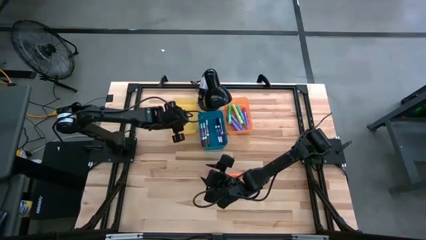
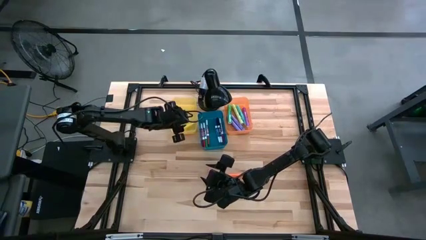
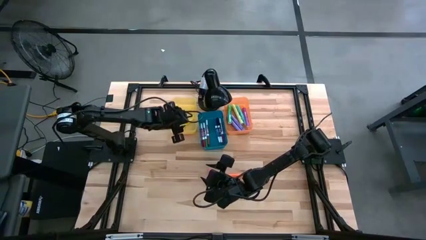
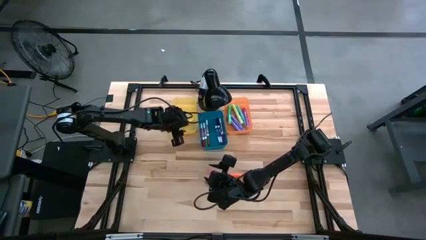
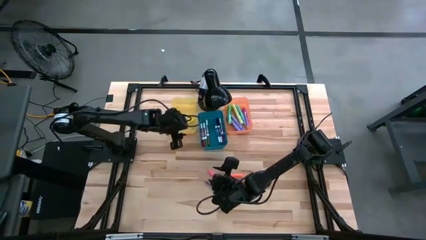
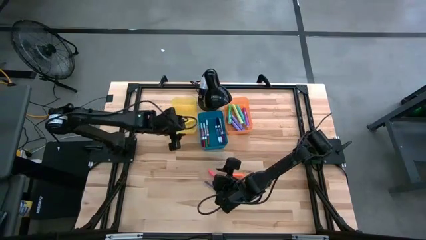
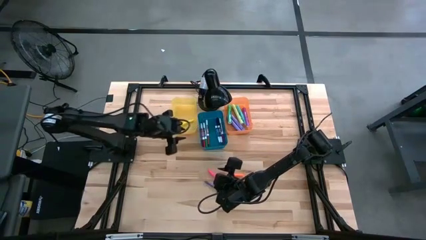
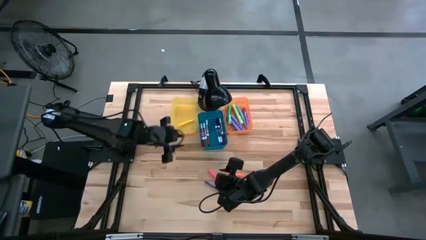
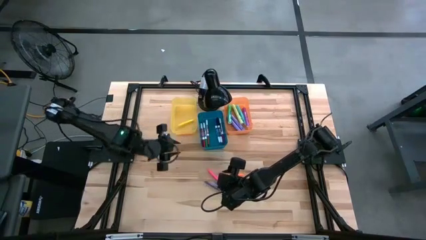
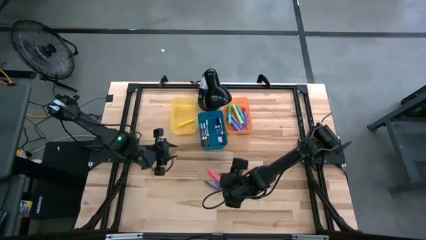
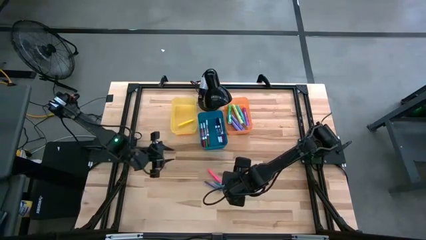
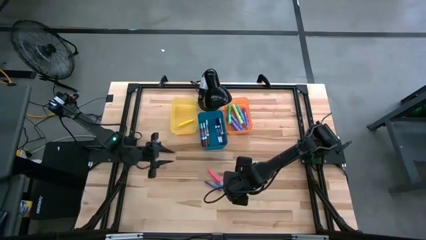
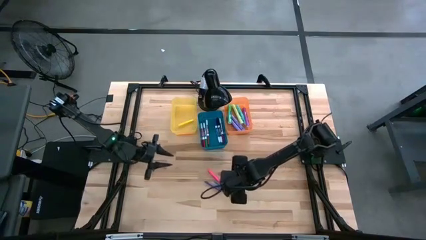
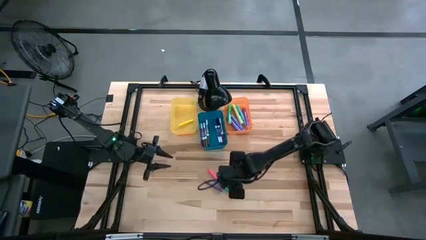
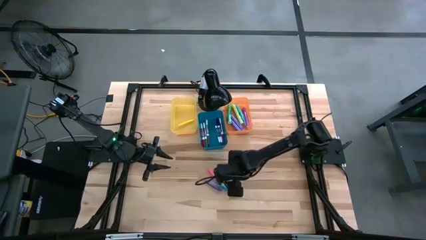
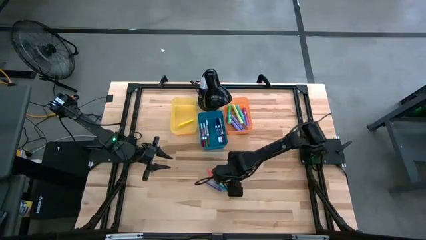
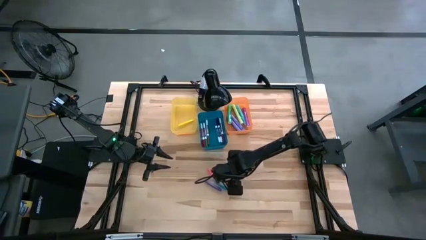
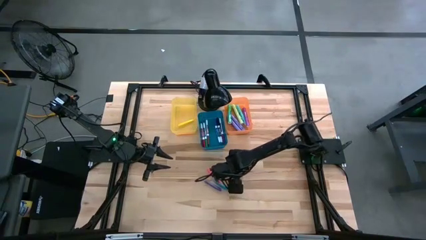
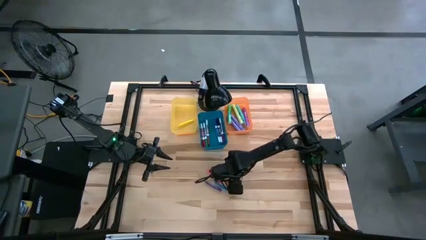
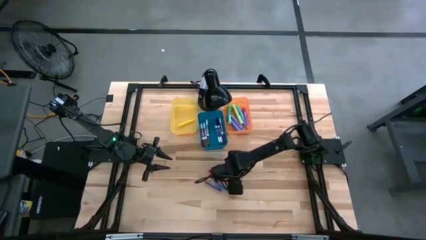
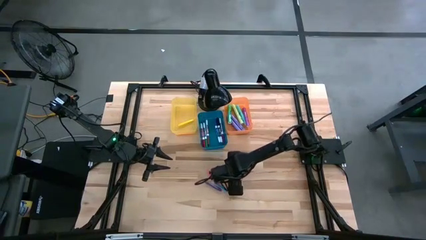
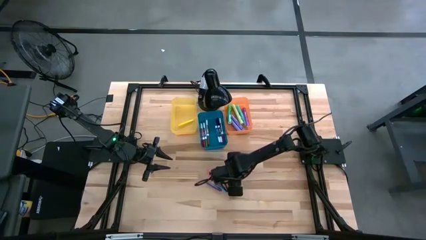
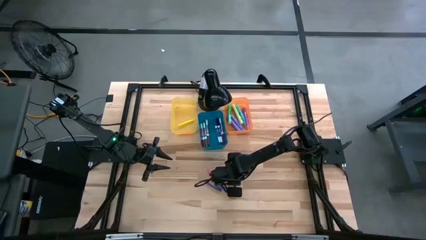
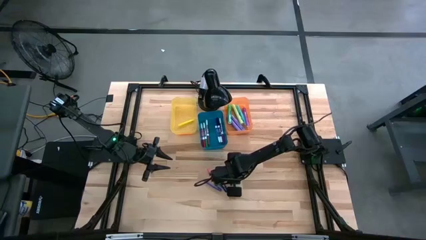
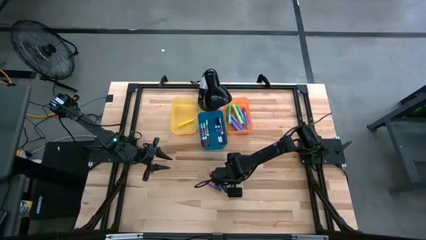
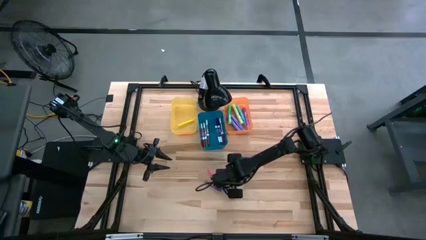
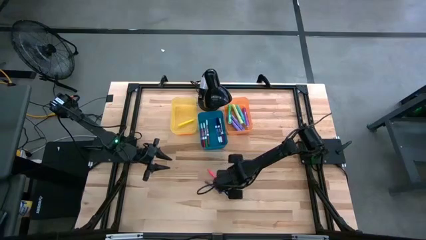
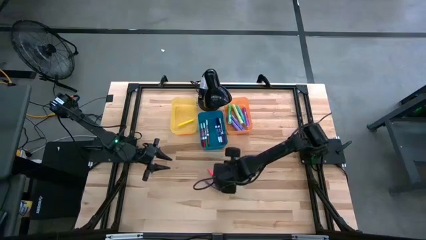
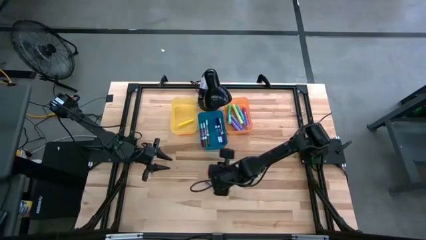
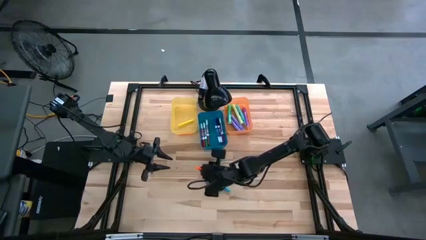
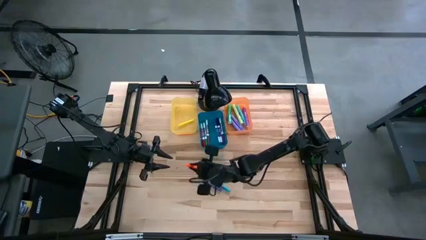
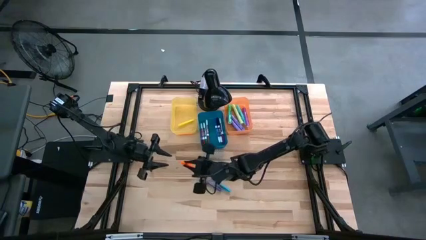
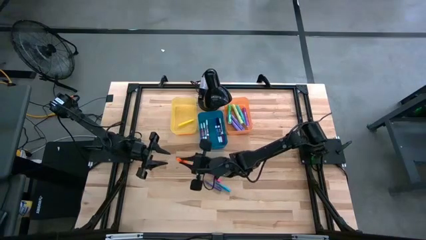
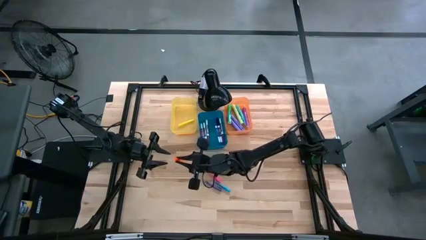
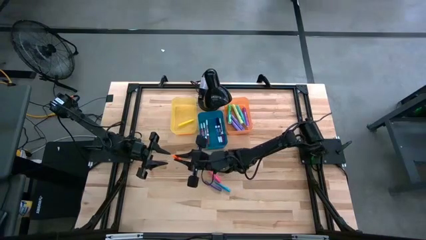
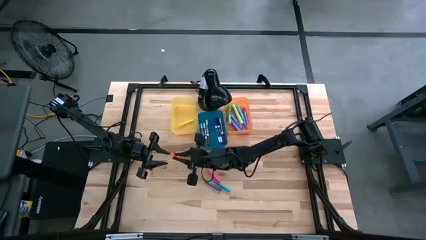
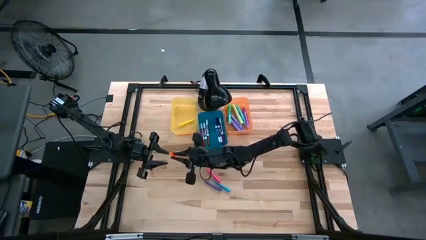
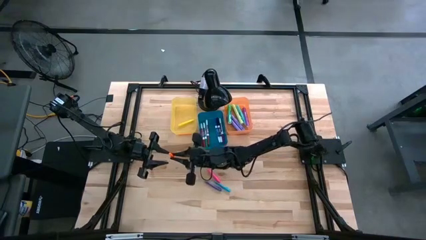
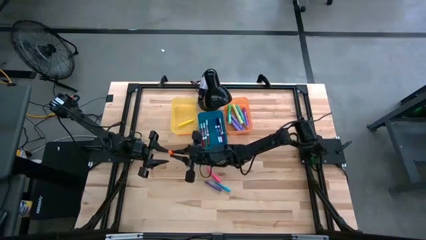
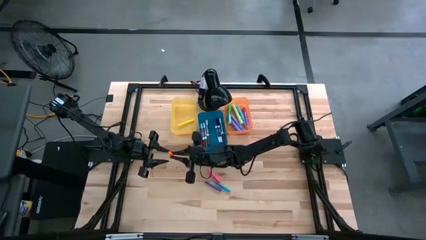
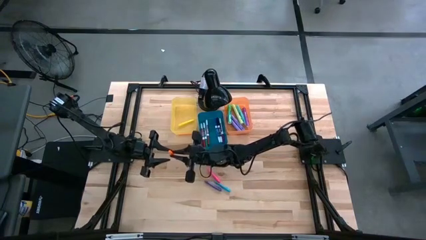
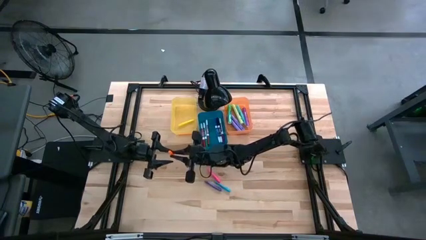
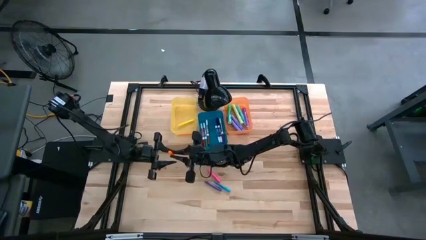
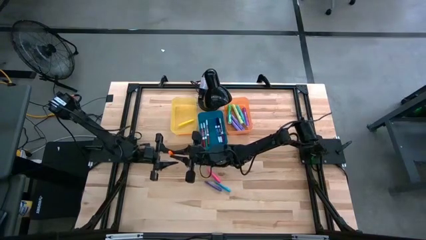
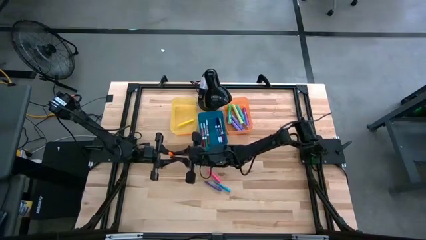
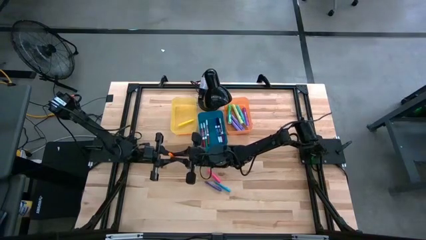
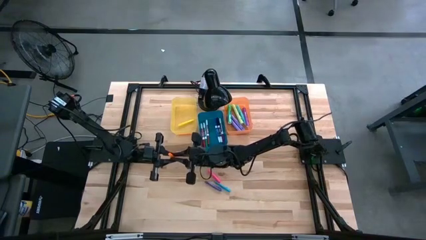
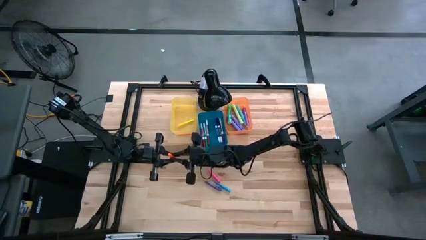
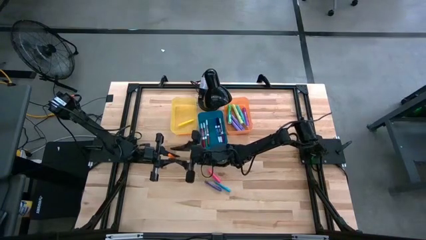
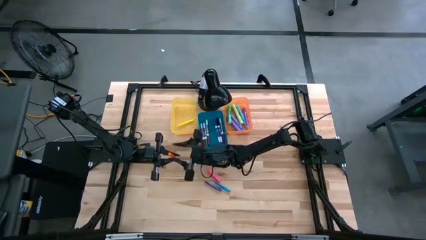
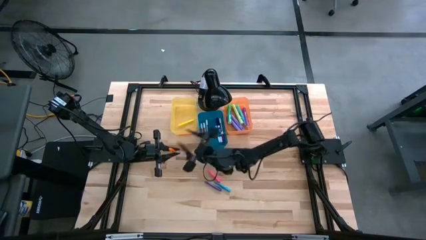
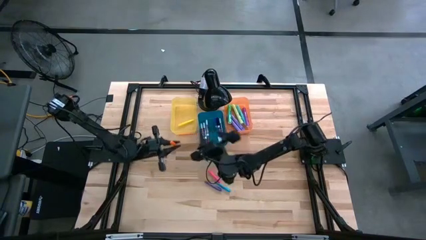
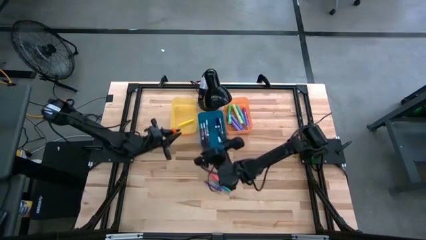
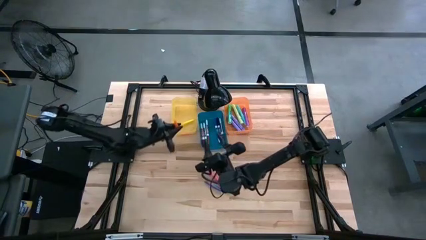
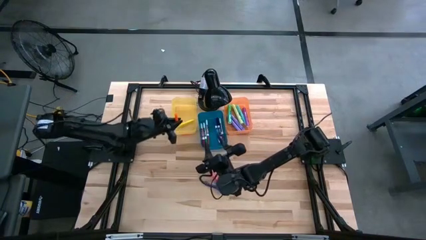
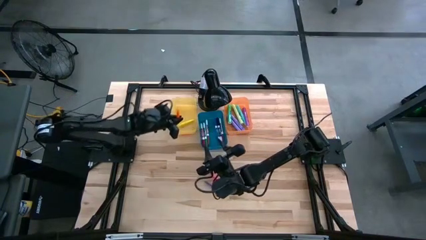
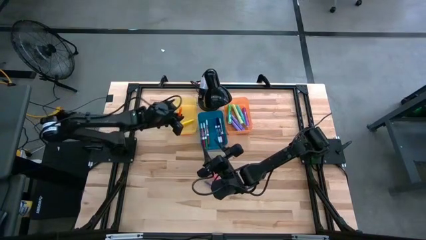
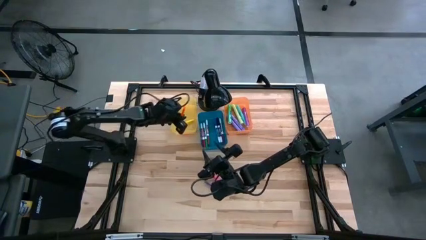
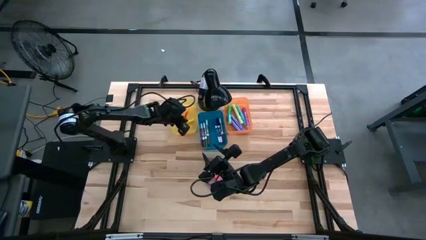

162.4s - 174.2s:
Task: Pick & Place Markers
Put the orange mini marker into the yellow bin

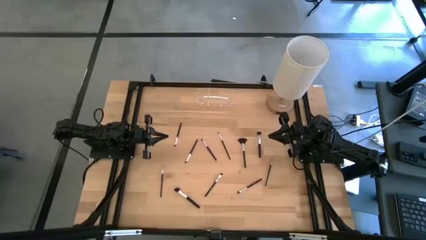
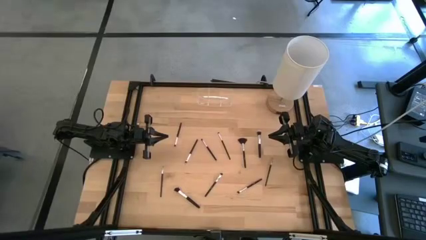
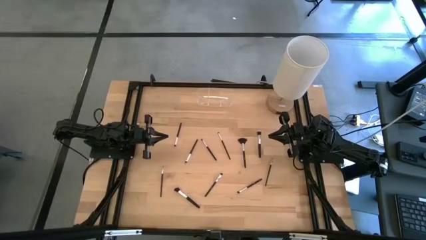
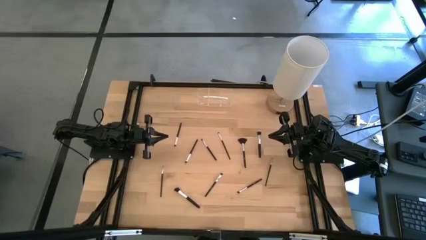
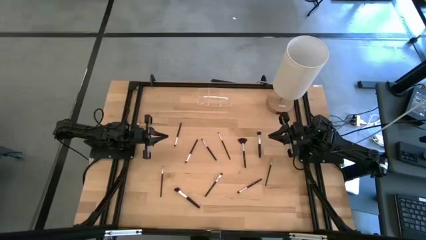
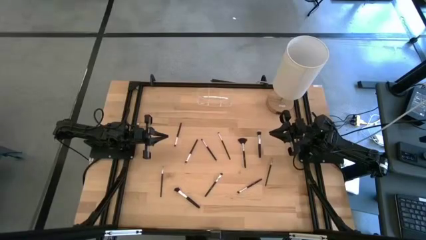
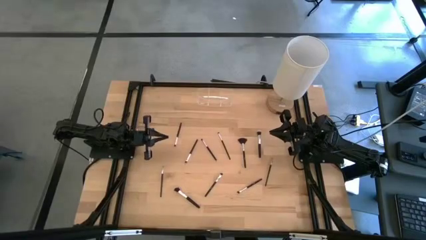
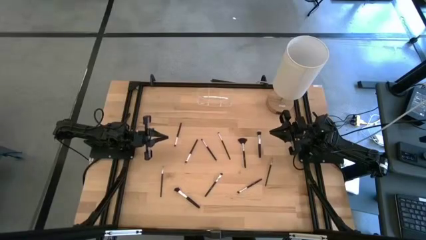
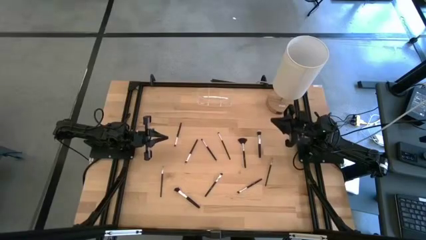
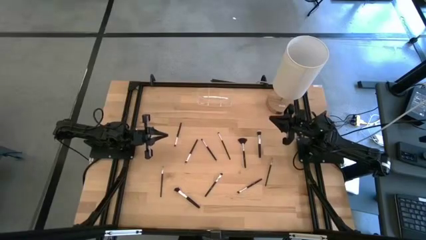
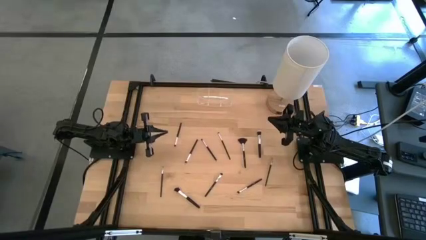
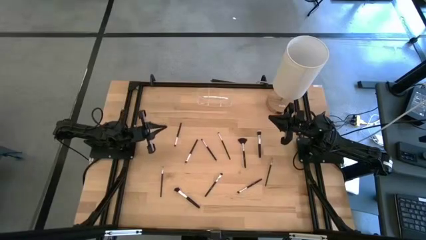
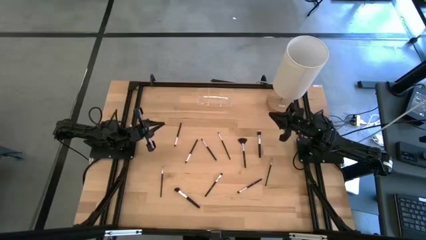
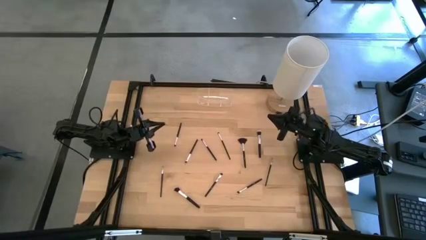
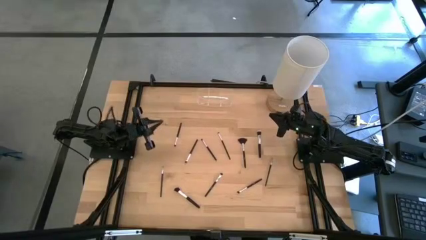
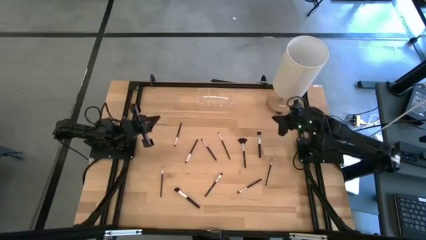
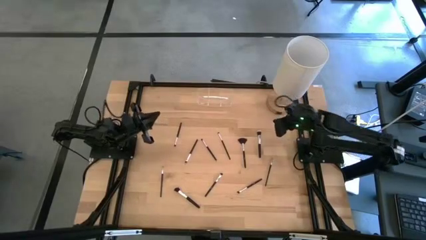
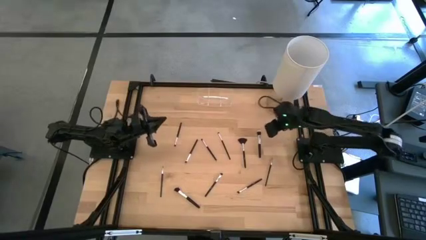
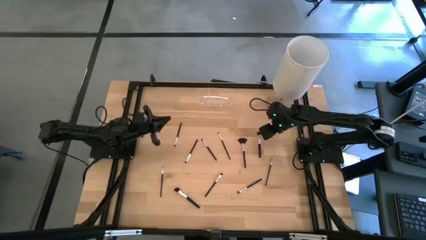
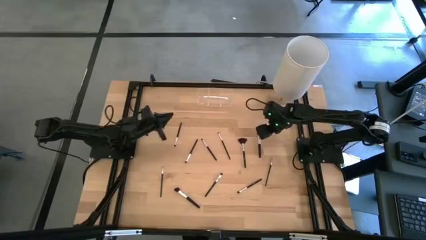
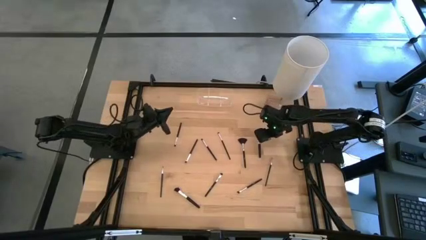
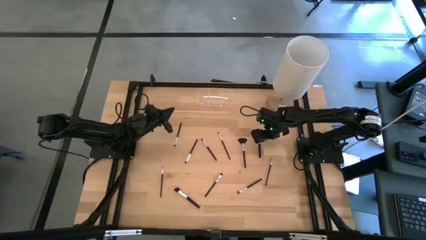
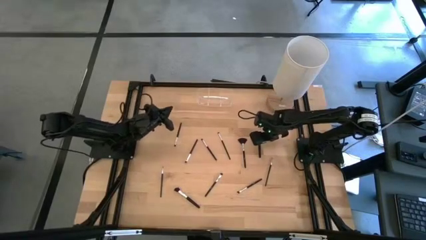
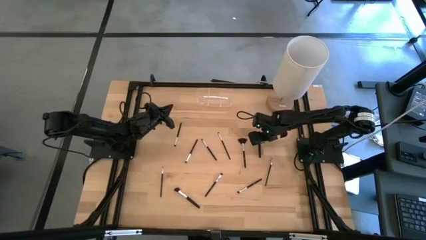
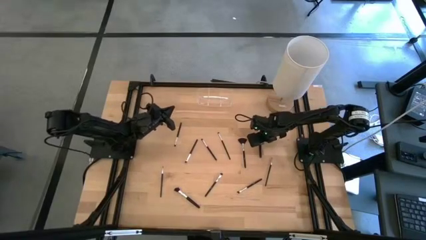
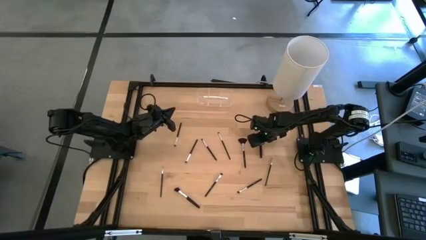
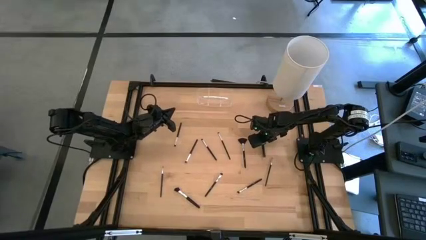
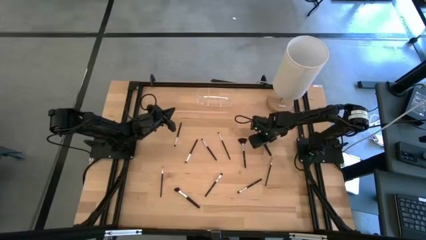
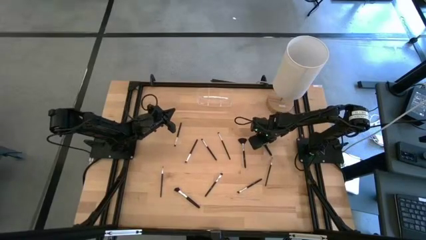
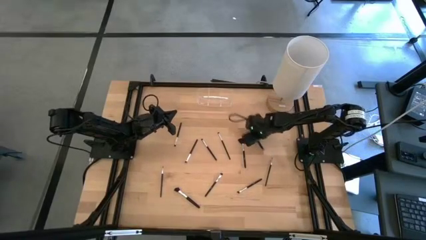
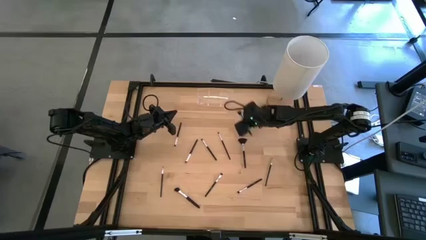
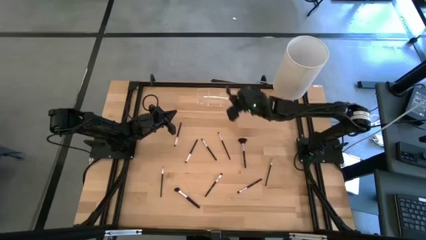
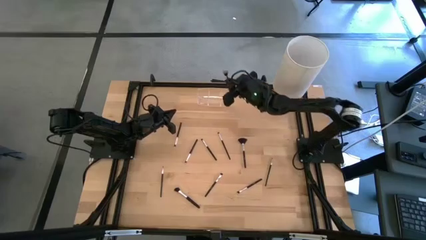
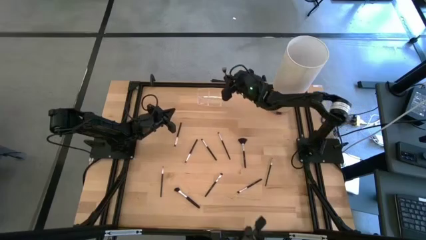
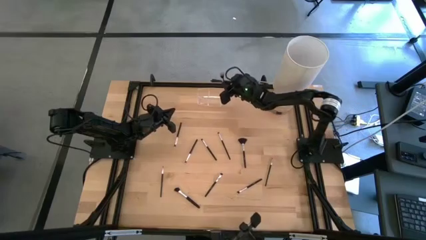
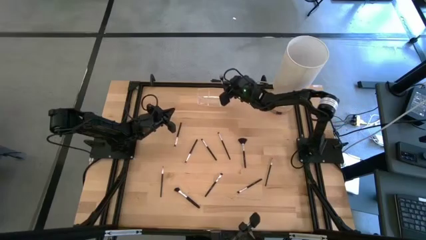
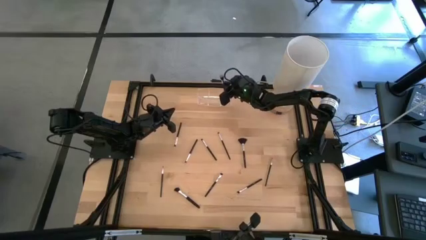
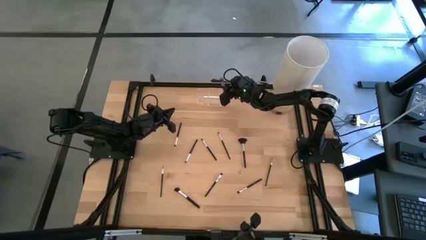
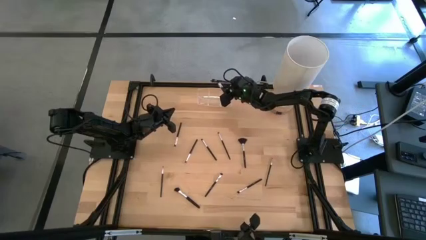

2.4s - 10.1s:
Task: Put items in baskets/containers
Put the black powder brush into the transparent organizer
